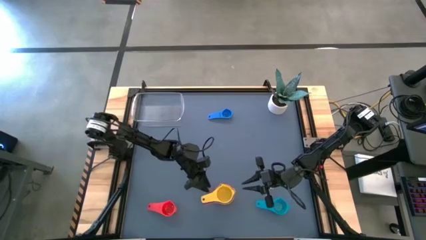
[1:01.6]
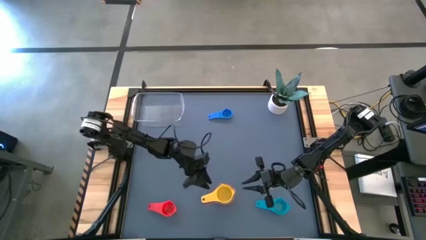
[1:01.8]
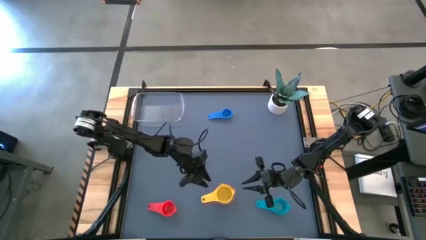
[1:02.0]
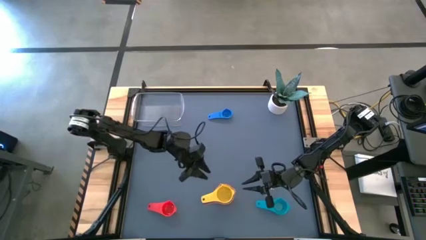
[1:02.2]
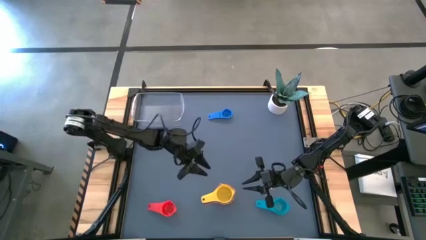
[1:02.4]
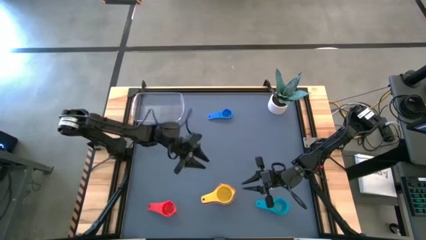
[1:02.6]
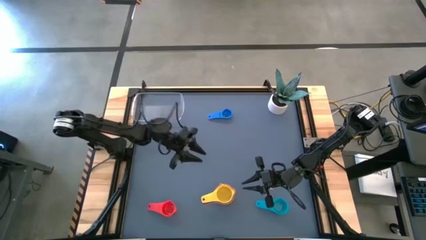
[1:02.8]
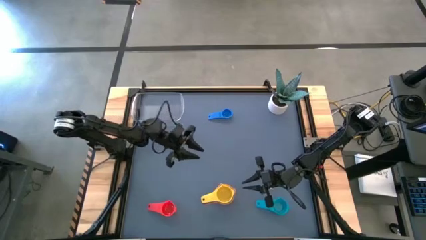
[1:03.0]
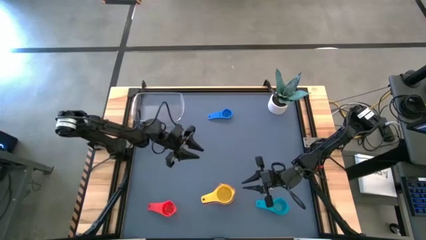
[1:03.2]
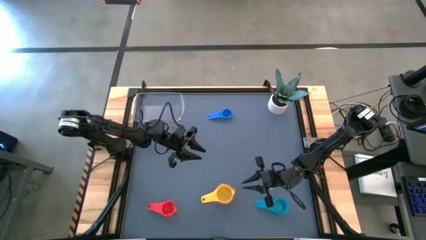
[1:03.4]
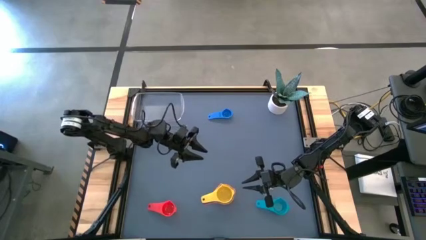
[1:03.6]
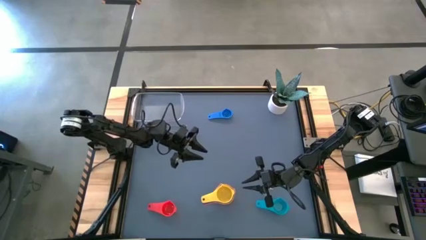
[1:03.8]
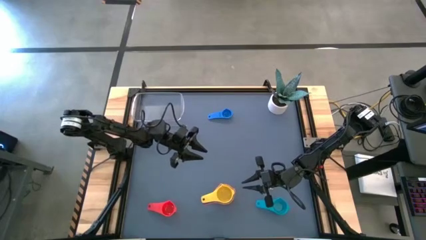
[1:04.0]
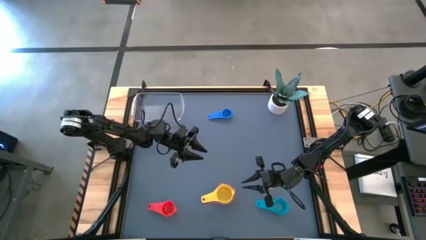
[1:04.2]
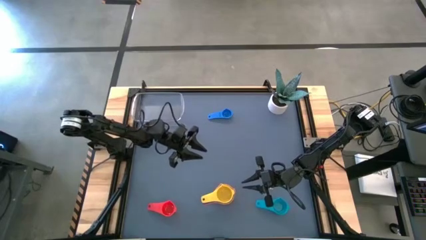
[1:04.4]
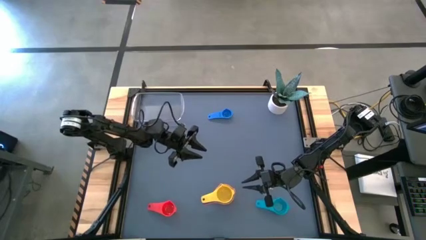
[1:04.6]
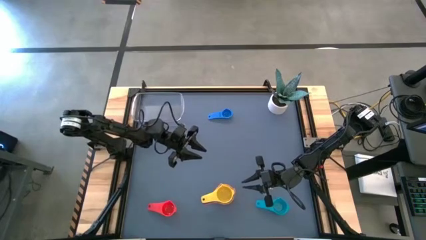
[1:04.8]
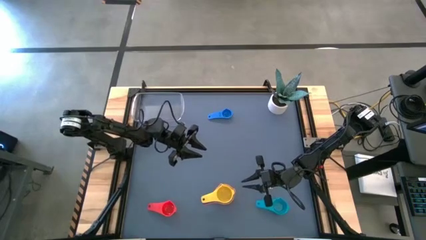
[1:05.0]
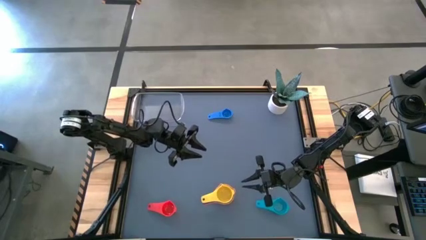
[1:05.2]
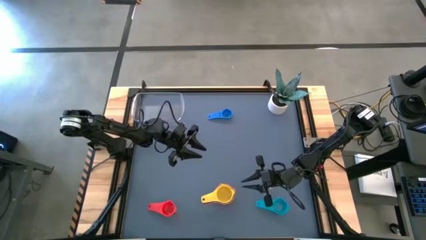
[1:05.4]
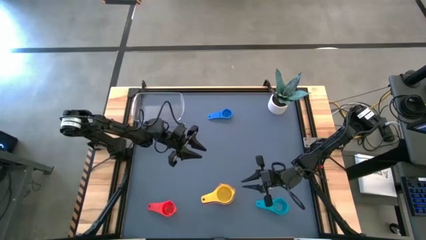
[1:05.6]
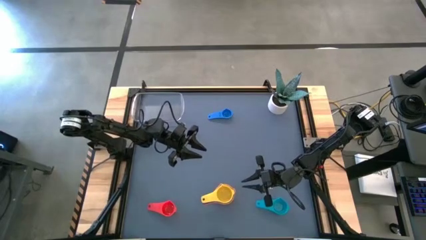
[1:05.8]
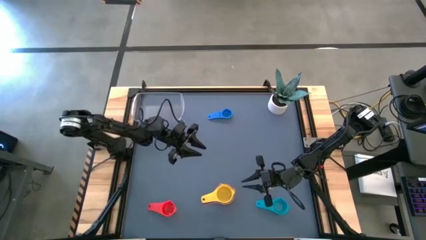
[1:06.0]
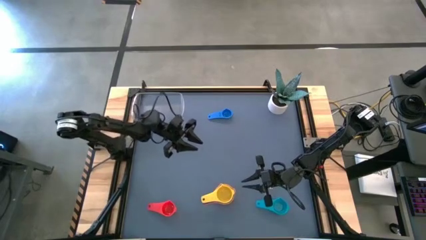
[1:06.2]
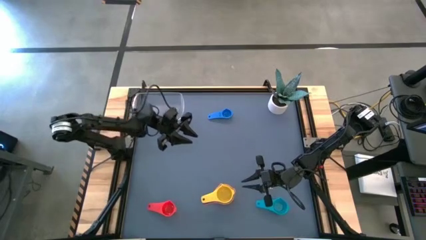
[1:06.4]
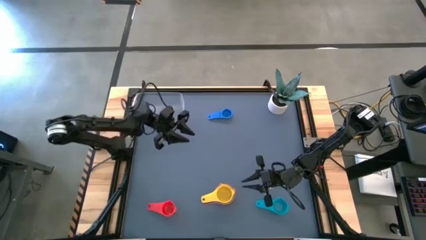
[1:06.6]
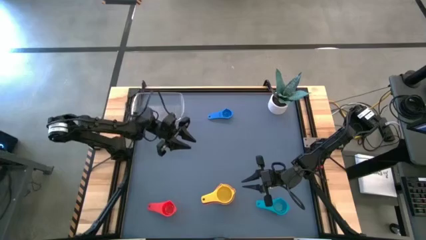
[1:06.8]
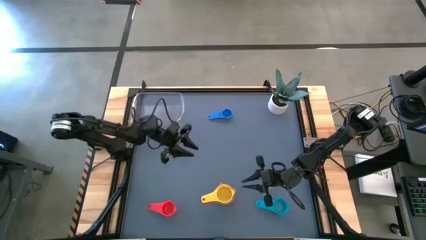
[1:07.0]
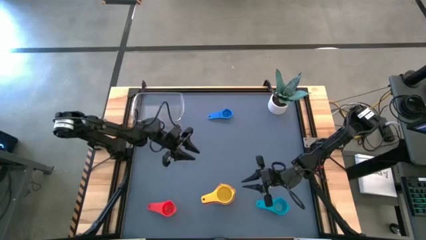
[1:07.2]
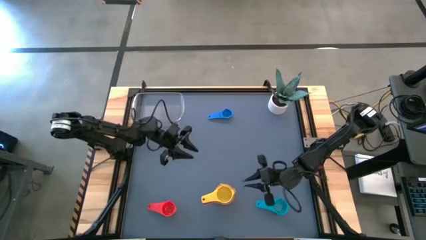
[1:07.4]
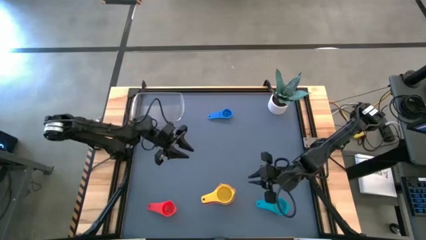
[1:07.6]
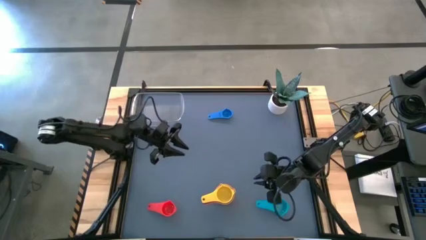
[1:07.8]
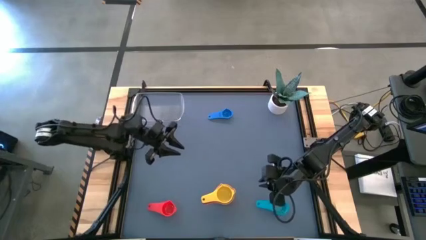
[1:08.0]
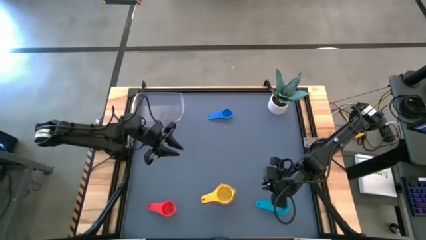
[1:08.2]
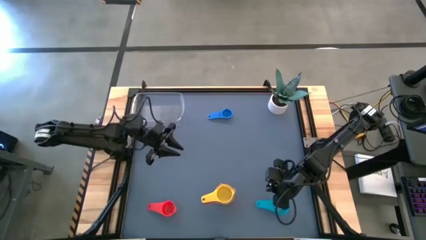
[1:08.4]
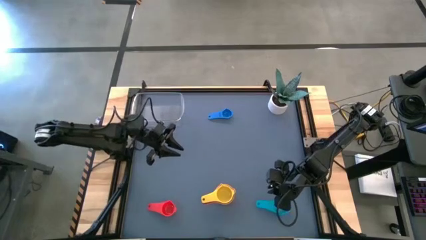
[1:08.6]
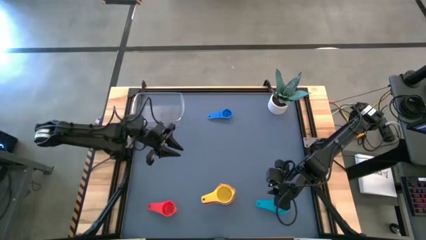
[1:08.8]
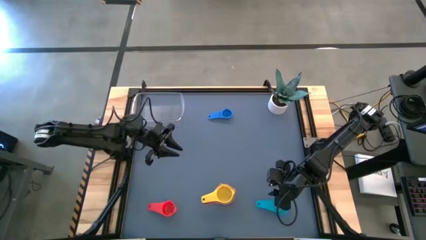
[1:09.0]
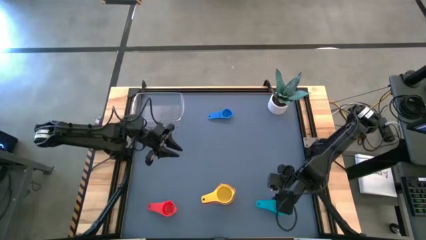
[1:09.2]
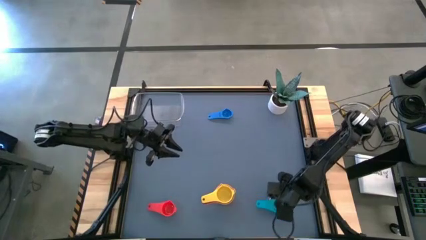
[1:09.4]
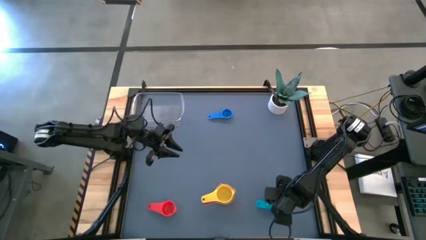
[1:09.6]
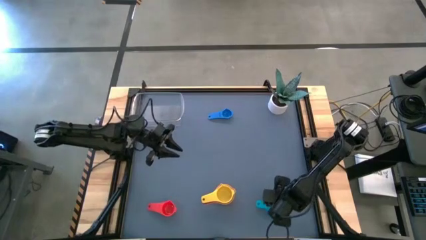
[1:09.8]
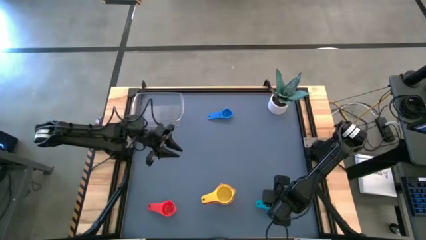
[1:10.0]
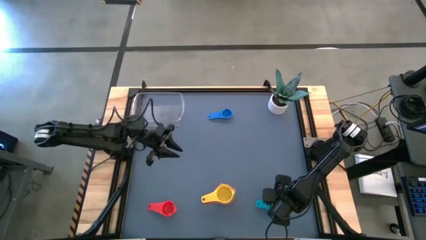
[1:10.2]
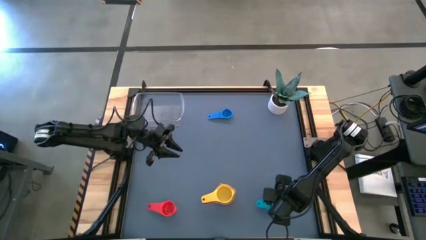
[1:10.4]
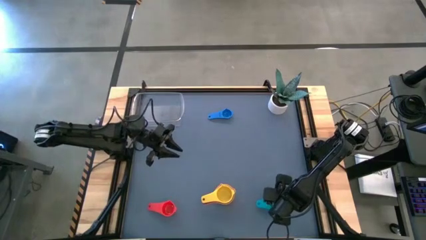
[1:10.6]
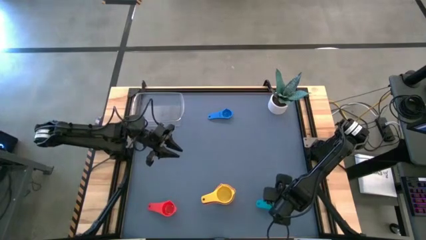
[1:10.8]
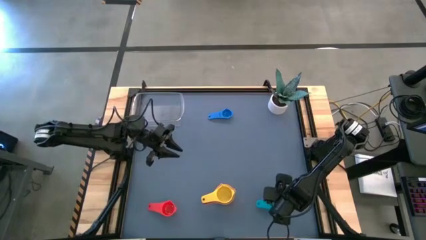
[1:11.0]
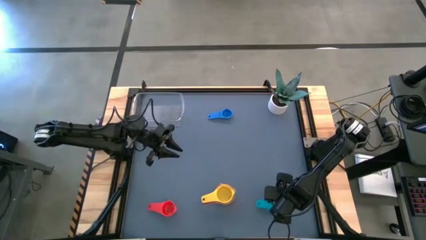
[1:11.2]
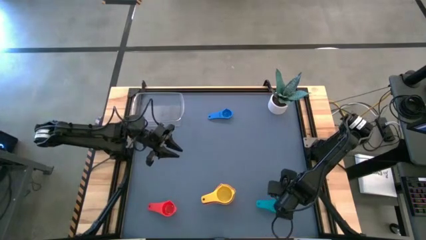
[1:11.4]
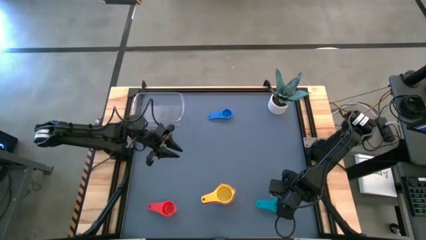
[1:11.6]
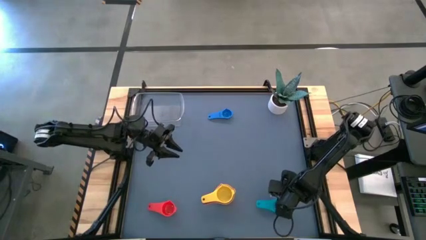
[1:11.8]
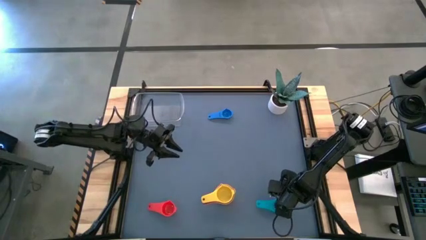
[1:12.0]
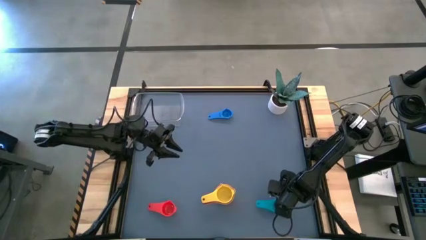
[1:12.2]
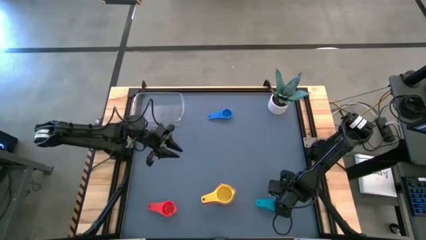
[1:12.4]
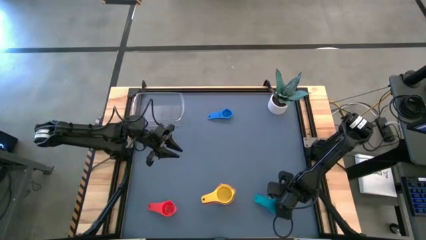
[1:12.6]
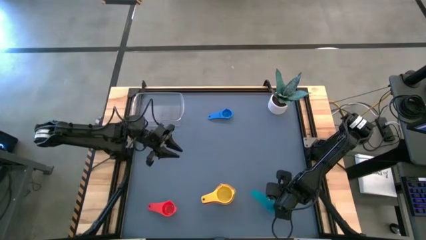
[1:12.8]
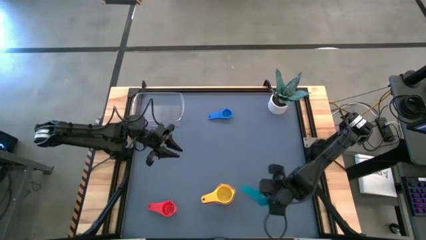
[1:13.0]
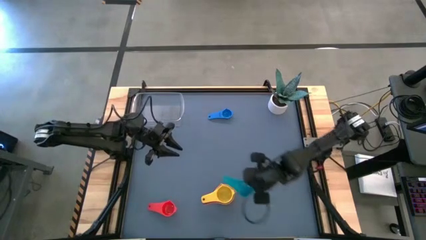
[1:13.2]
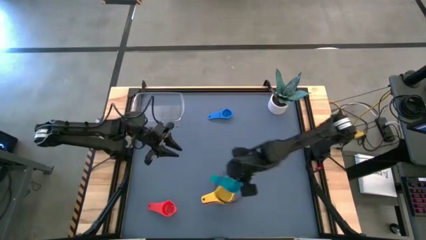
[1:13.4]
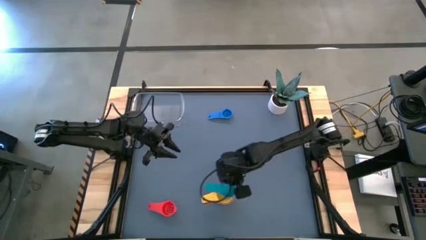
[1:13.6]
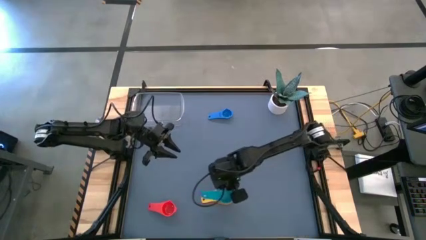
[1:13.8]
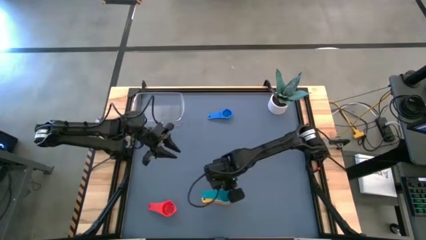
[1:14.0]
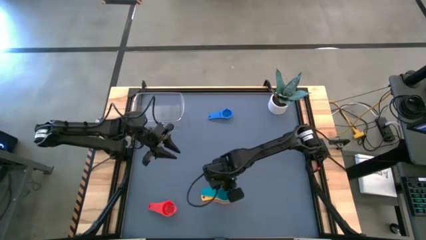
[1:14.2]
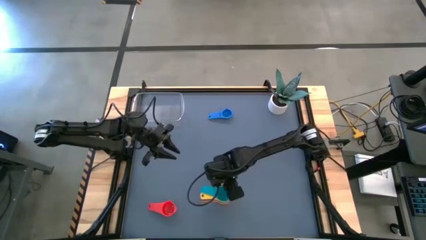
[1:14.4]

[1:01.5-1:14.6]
Task: Nest measuring cups in basket
Stack the light blue measuring cup on top of the yellow measuring cup

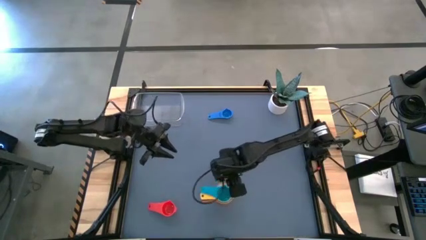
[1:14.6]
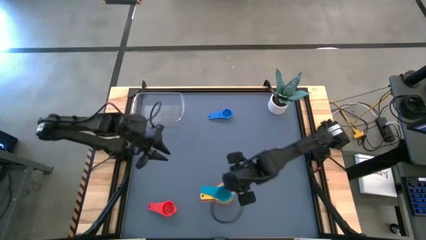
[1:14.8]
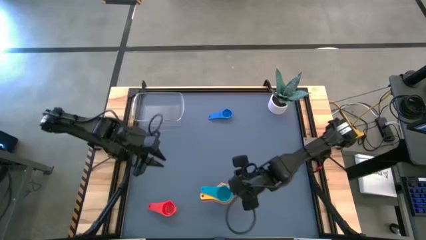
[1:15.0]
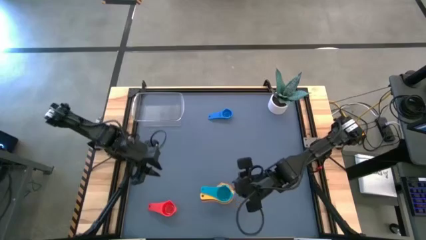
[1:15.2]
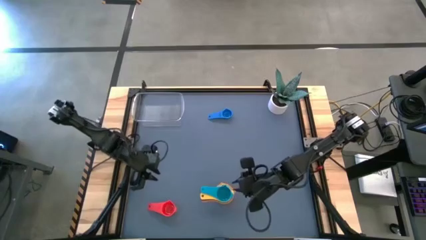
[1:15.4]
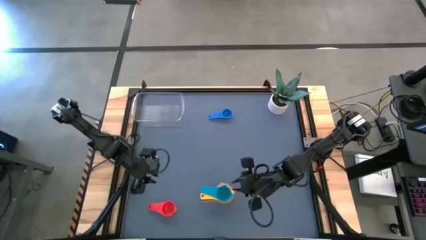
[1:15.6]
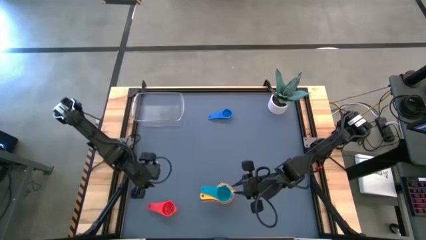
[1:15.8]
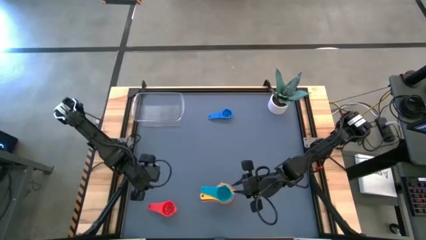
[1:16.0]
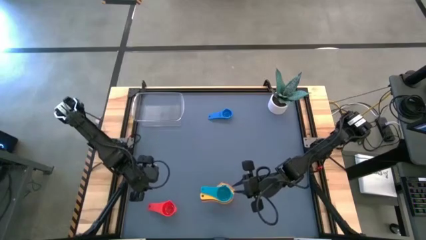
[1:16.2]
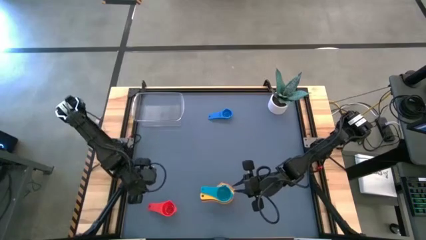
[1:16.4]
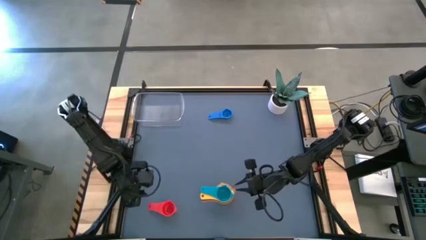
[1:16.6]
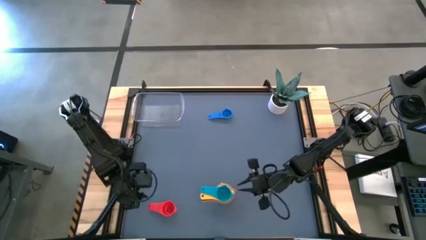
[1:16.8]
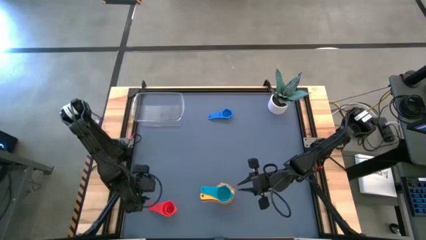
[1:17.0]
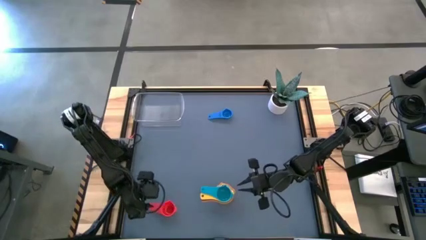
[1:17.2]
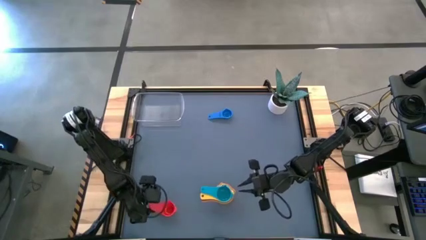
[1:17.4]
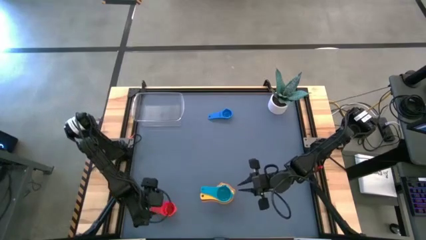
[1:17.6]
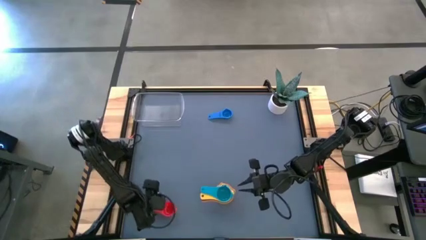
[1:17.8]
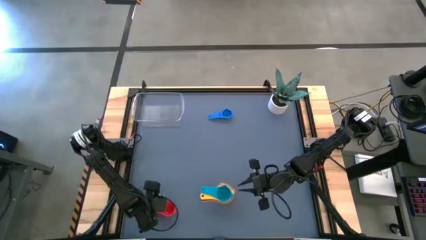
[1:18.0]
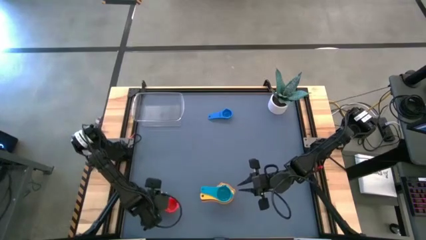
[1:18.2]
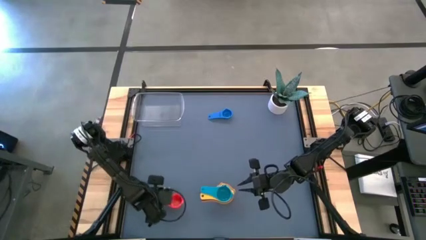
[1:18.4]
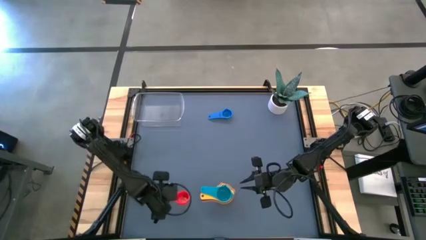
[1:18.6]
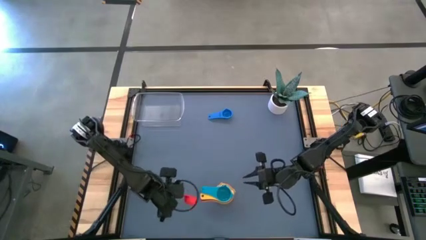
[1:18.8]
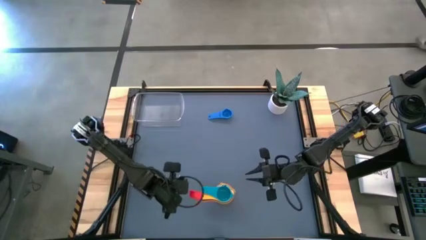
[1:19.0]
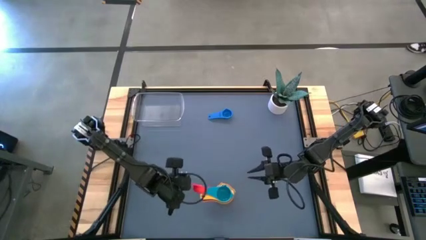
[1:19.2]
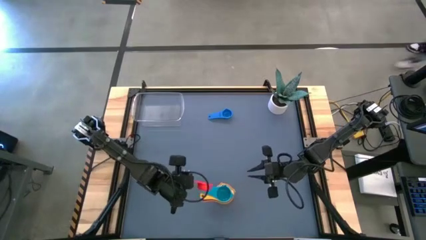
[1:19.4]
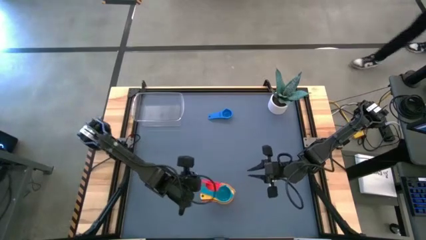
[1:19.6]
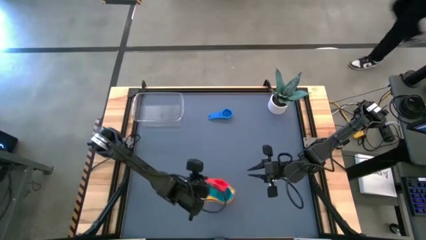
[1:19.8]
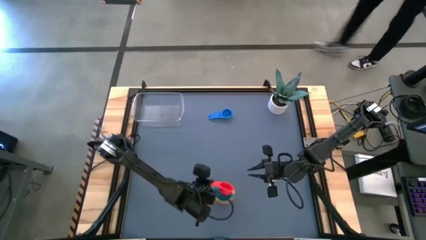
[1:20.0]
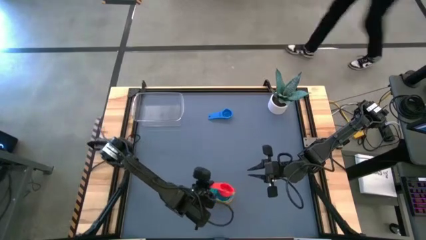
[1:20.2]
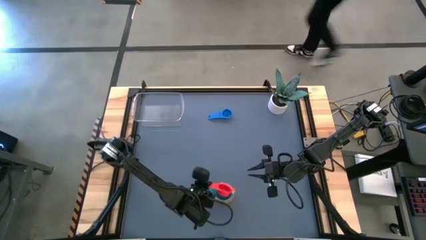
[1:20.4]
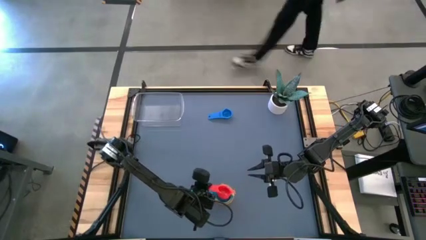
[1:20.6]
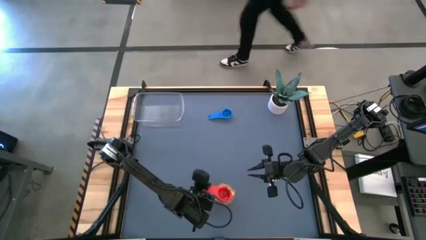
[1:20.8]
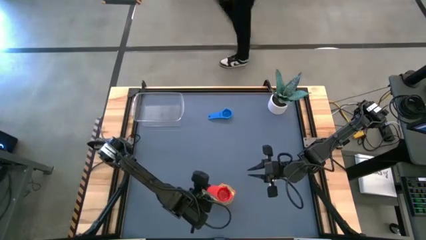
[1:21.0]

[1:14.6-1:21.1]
Stack the red measuring cup on top of the light blue measuring cup
